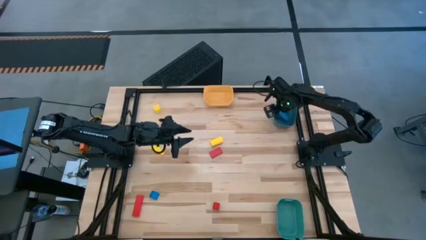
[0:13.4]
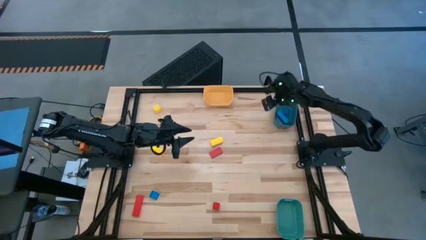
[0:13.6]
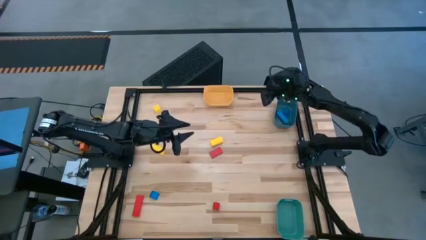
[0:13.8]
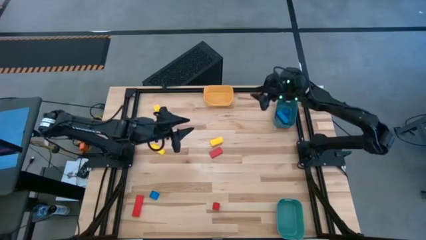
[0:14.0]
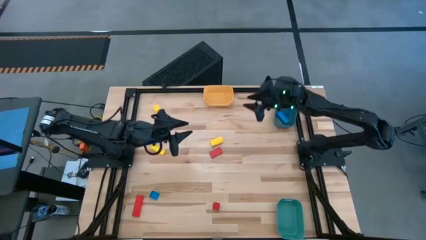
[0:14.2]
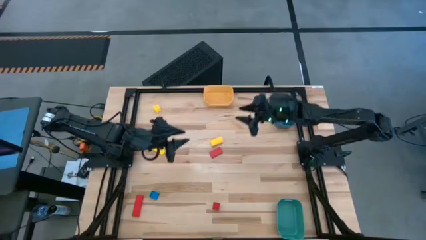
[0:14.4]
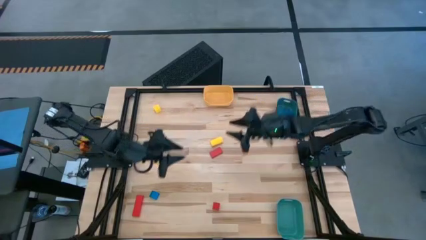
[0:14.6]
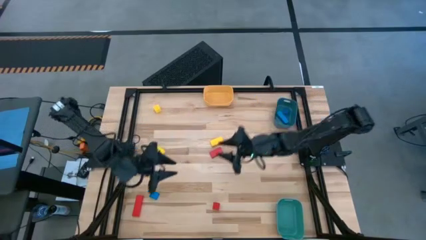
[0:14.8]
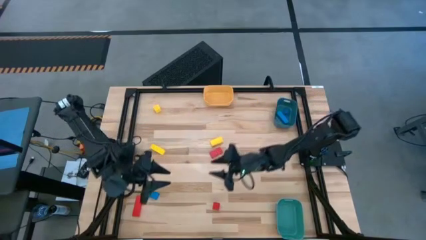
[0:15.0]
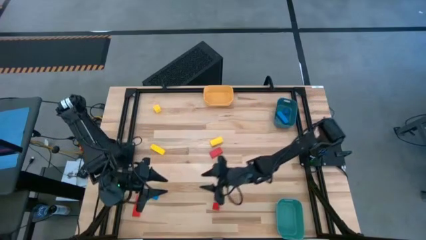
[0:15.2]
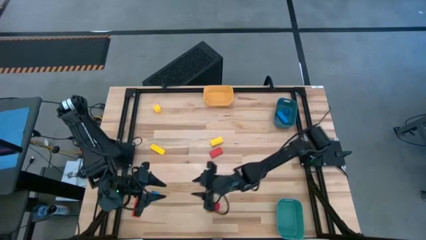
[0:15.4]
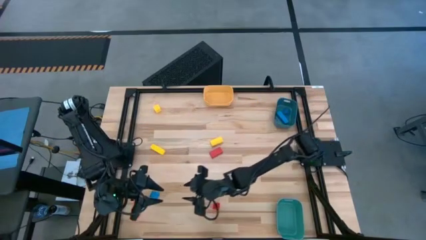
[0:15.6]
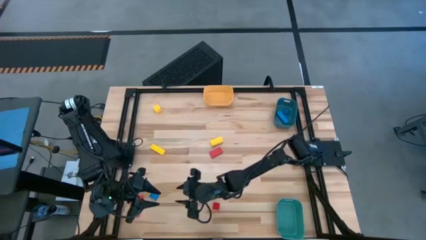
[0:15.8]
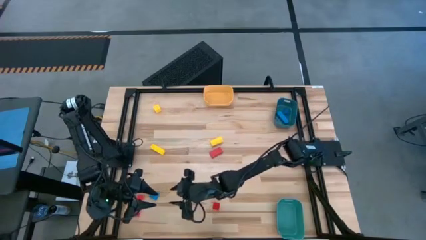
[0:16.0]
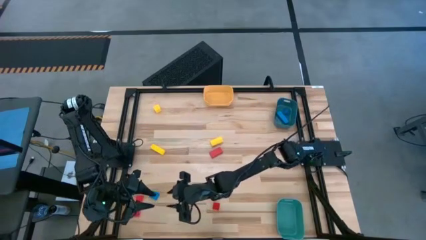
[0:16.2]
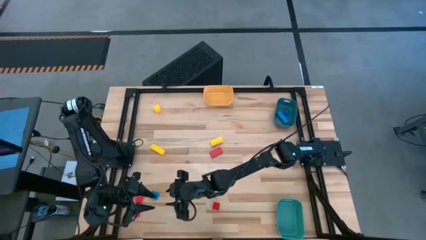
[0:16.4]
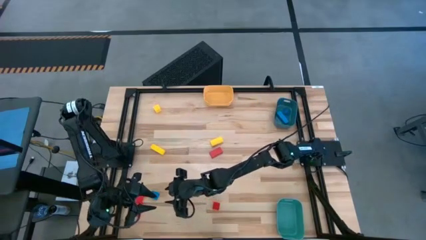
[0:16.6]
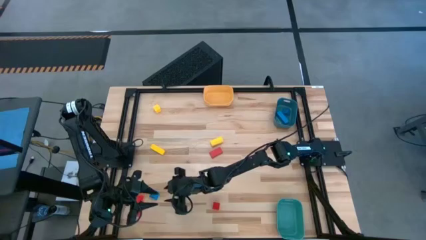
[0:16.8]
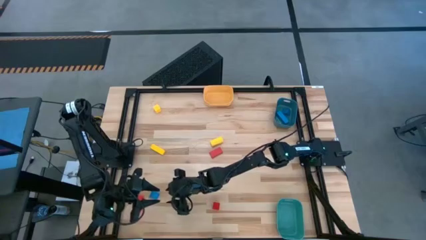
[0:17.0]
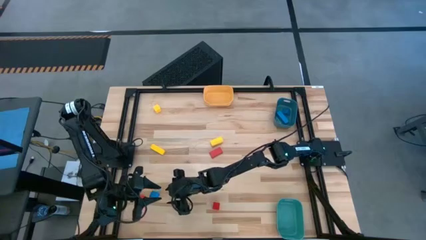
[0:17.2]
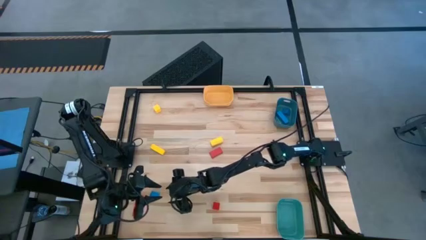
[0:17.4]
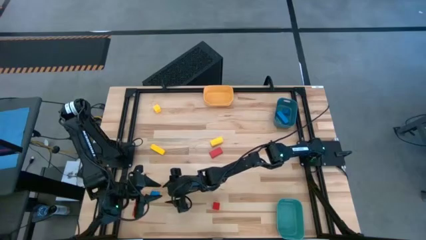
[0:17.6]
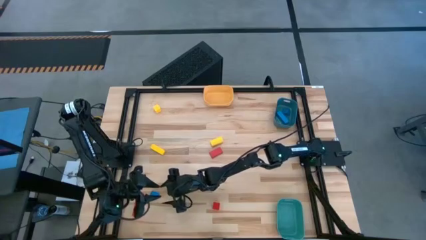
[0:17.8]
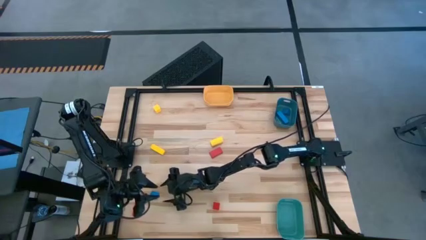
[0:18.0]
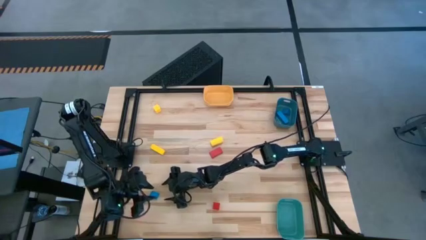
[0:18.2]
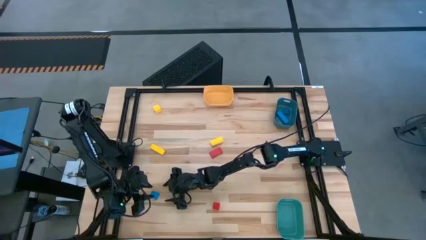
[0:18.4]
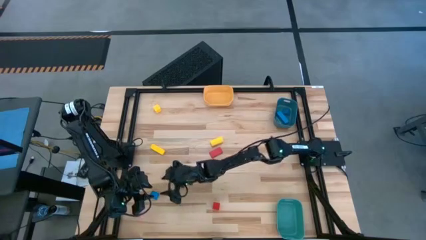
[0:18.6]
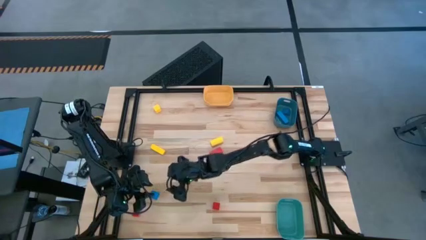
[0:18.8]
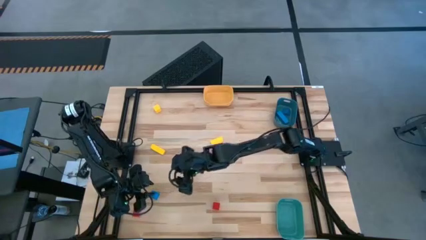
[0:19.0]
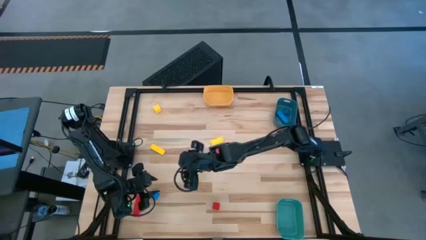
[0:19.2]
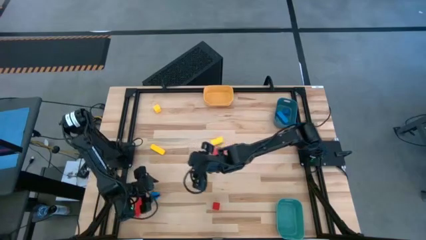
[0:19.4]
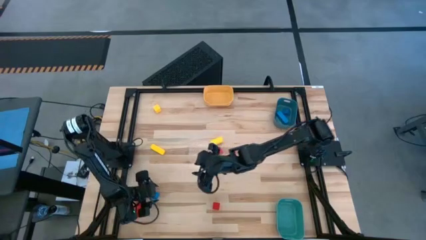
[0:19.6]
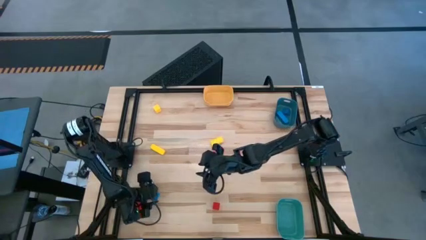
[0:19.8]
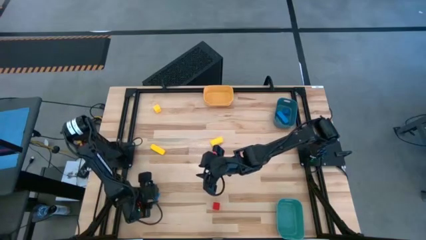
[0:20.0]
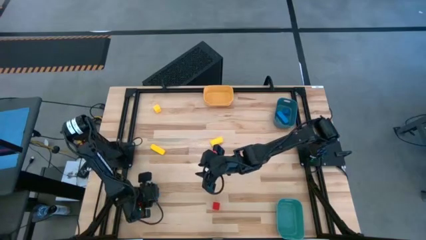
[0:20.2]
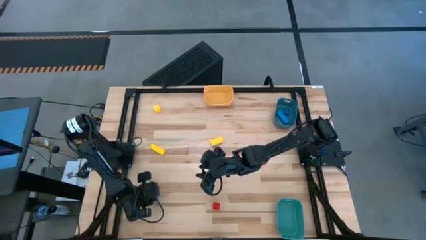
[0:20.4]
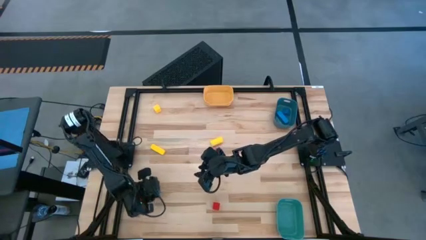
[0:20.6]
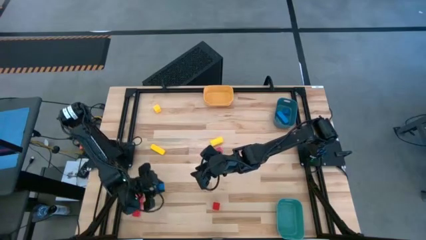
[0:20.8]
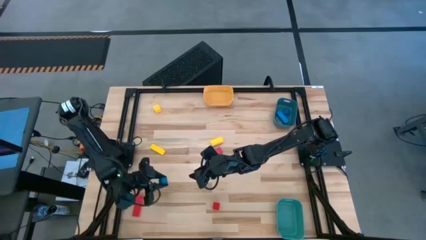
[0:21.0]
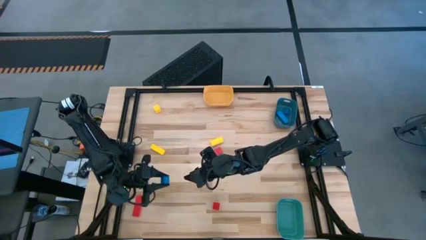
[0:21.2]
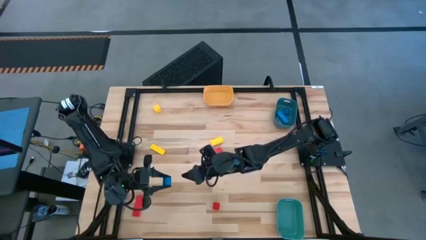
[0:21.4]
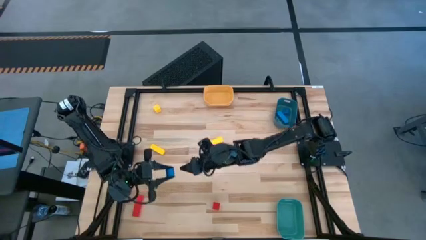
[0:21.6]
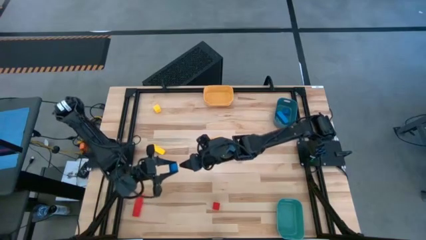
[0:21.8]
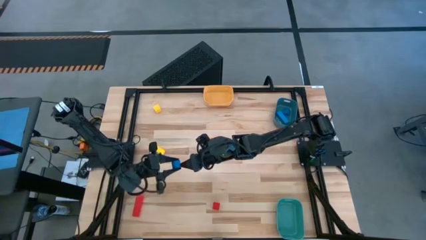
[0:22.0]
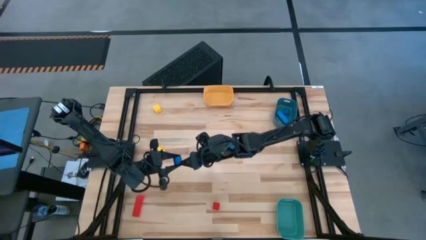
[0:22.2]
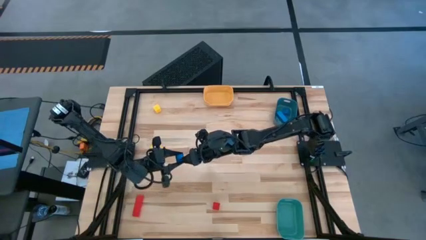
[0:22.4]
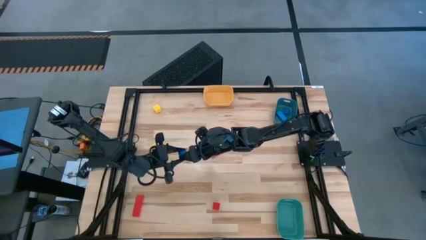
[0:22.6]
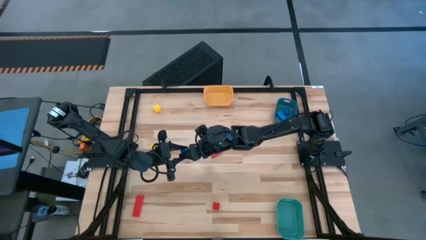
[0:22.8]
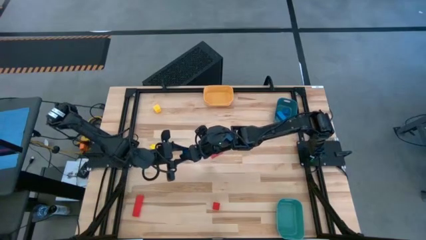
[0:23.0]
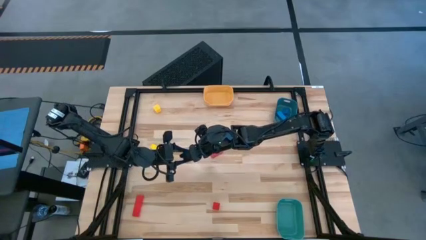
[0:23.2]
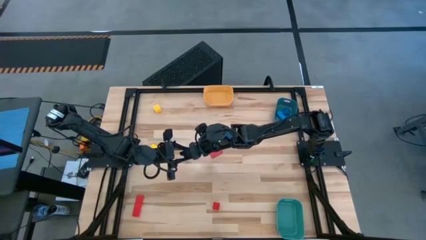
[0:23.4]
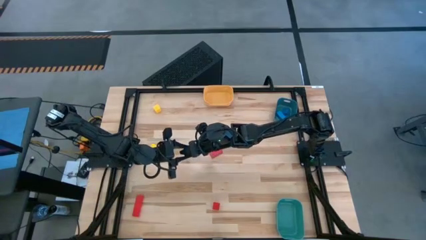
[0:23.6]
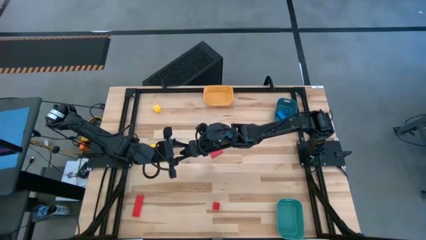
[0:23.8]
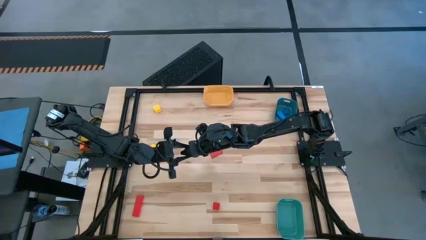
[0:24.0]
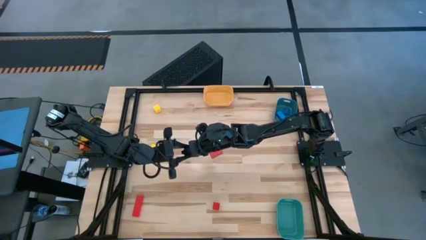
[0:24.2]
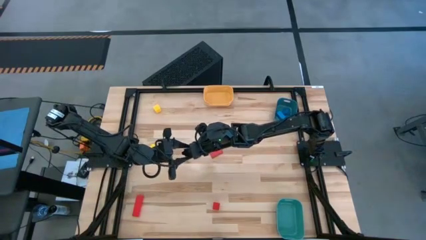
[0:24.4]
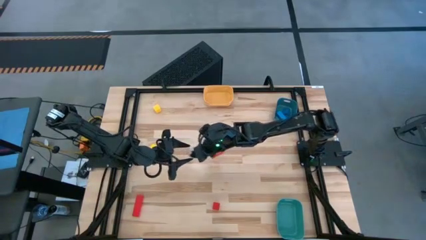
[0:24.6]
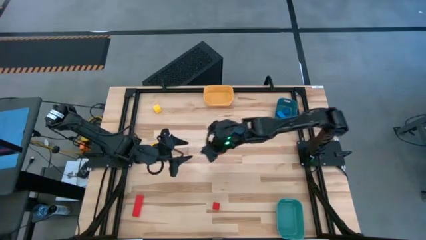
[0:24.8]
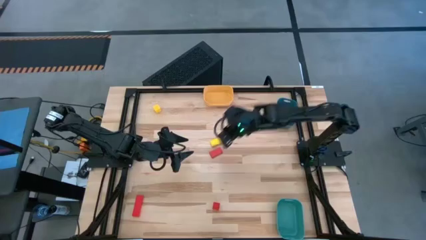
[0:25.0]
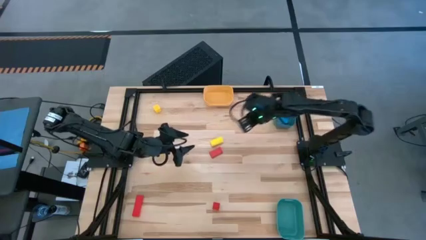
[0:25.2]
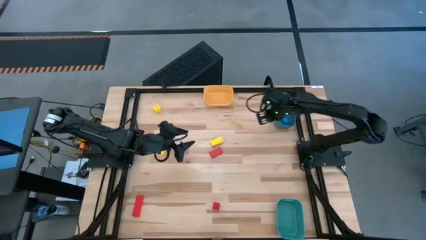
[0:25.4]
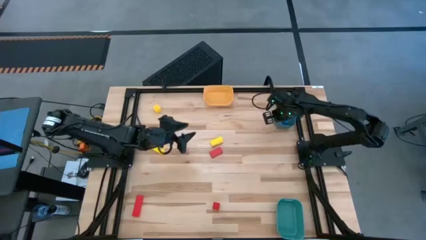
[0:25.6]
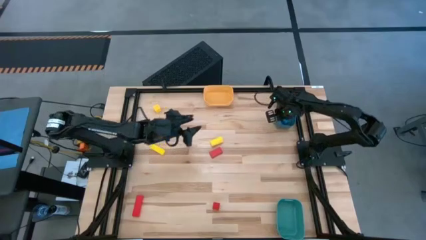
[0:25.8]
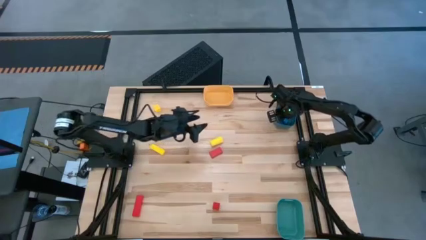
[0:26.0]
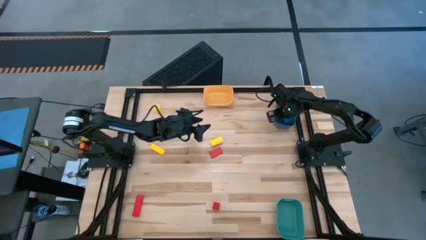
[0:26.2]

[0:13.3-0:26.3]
Task: Sort & place blocks by color
Put the blue block into the blue bin

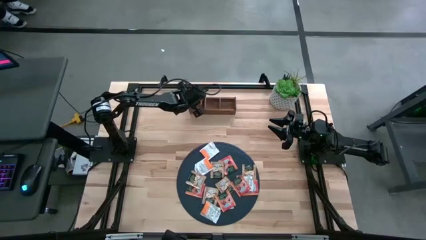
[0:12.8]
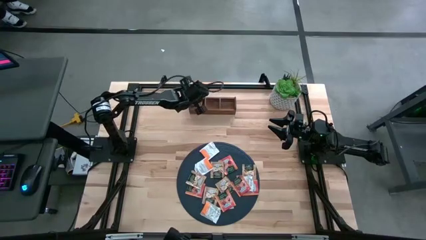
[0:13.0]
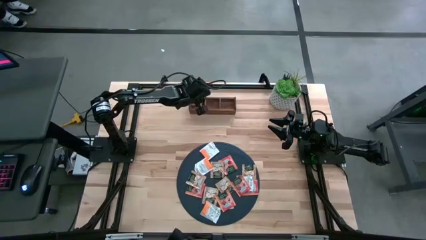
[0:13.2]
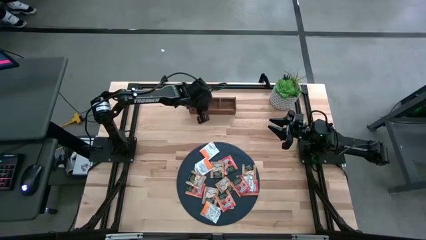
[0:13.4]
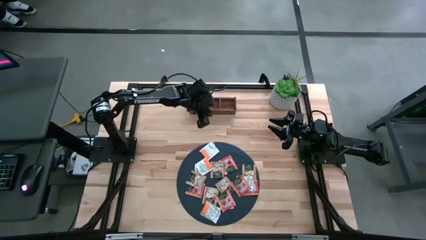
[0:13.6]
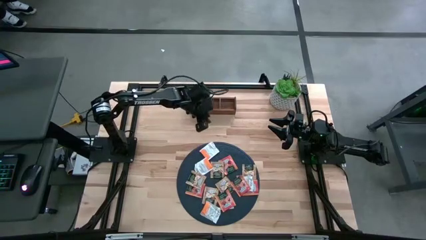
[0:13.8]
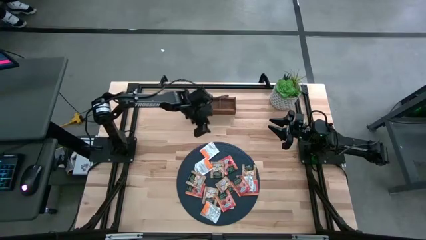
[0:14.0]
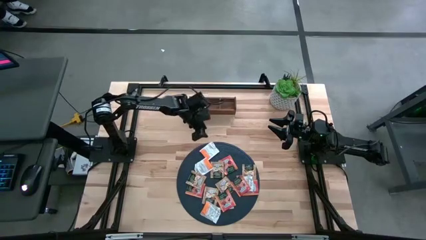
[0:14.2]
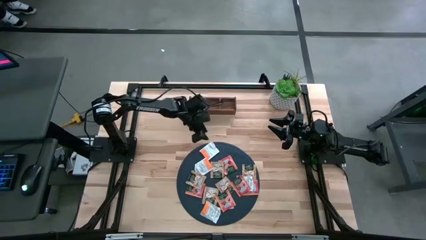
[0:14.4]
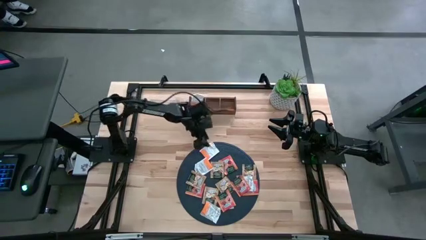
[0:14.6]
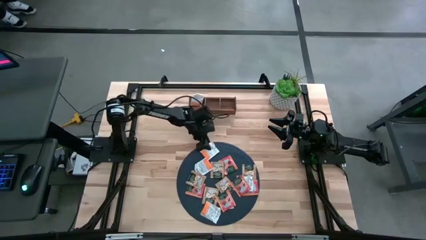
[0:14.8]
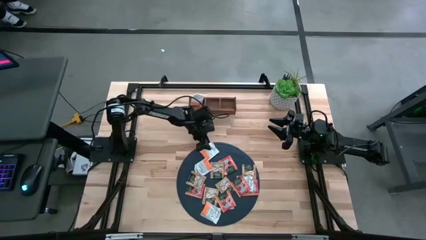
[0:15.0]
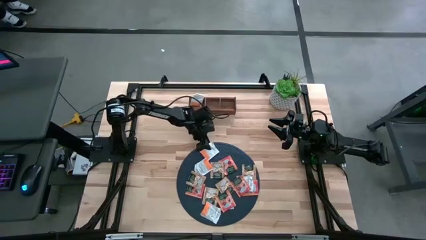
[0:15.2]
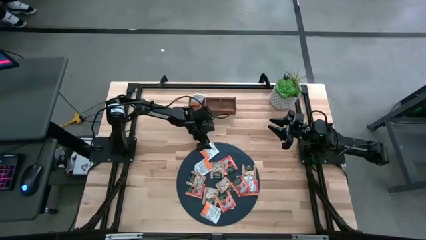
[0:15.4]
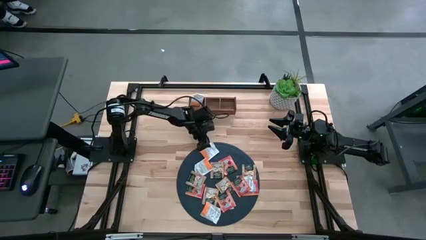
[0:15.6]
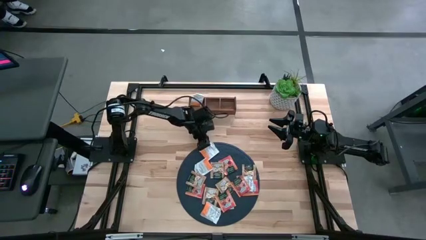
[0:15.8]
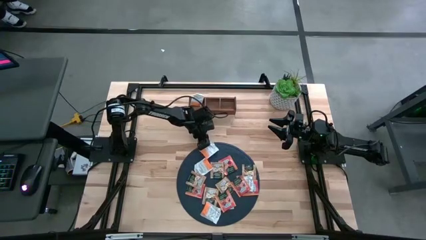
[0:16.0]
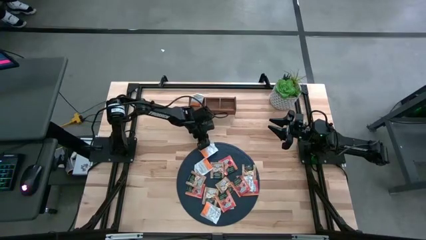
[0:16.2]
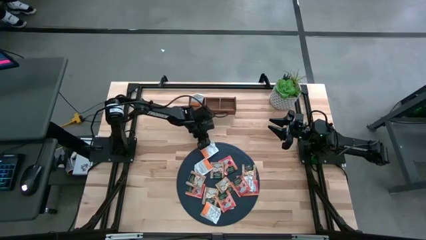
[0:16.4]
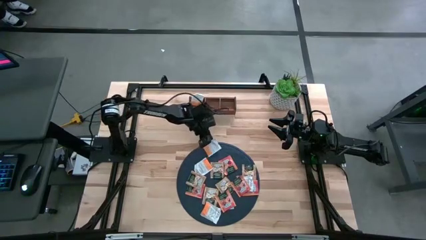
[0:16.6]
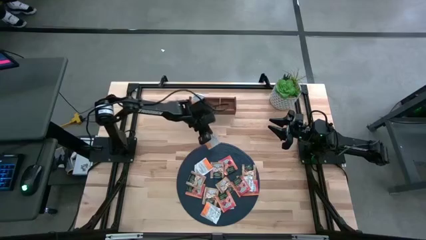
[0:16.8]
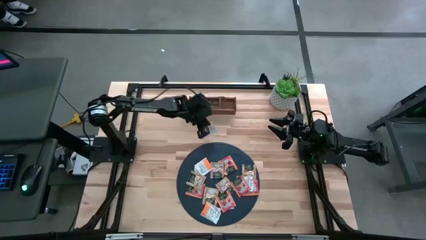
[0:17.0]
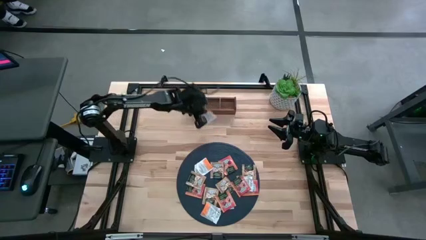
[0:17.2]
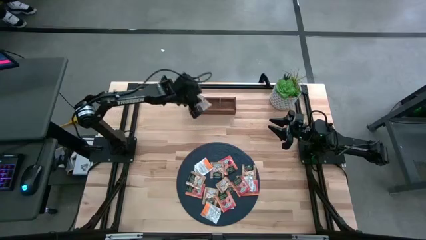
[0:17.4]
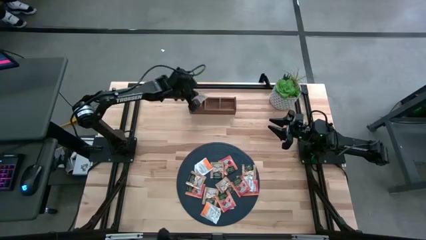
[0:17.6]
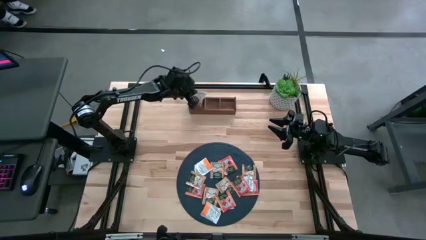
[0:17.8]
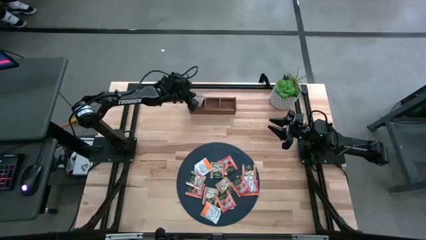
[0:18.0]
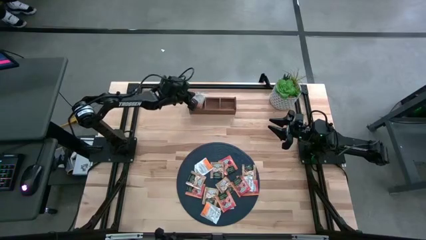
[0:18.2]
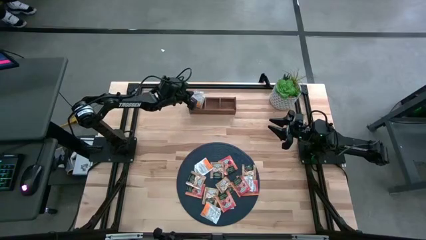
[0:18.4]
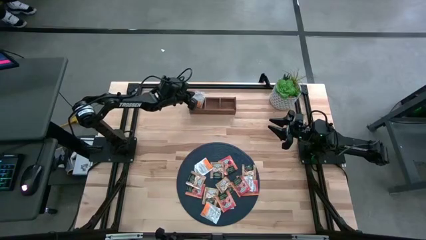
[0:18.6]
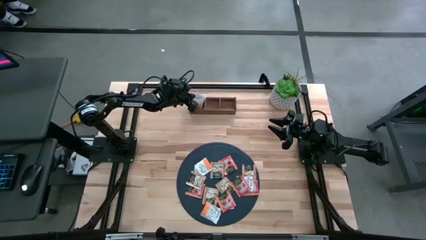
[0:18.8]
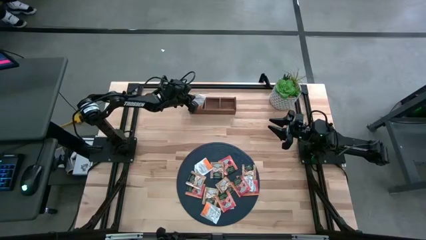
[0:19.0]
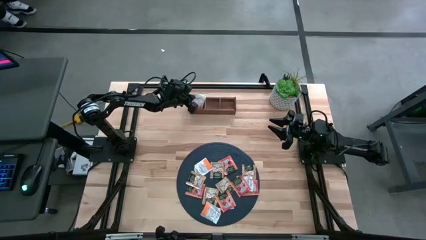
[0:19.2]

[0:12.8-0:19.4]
Task: Pick & Place Tea
Put the white tea bag into the left section of the wooden organizer
